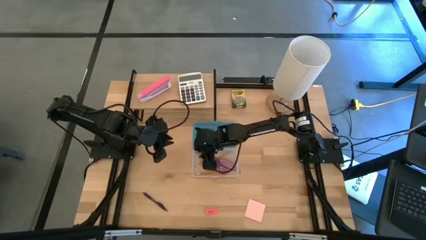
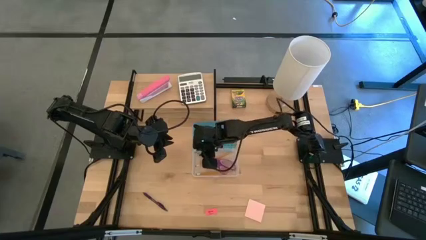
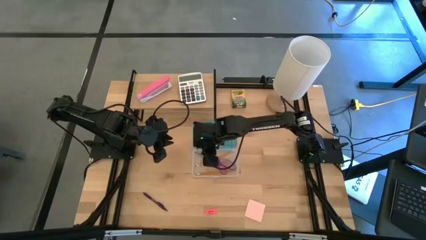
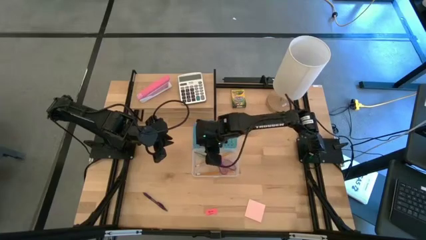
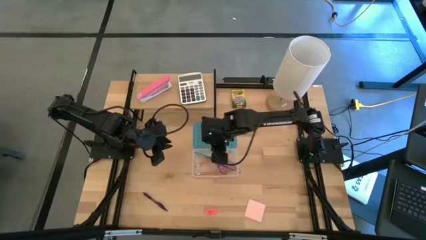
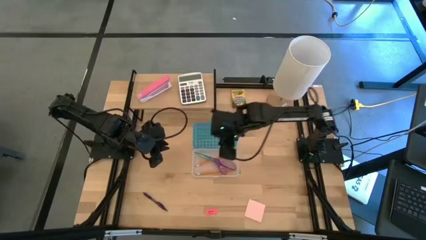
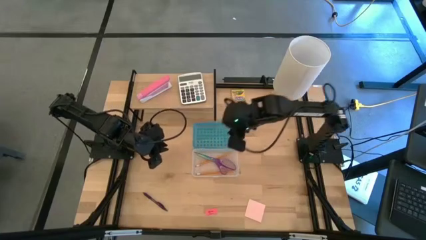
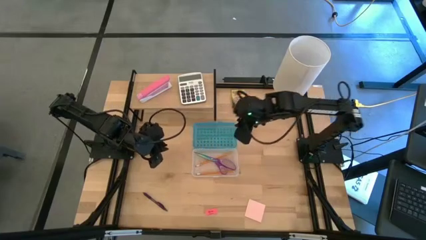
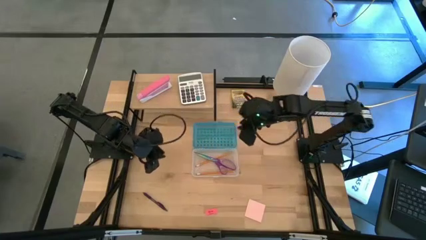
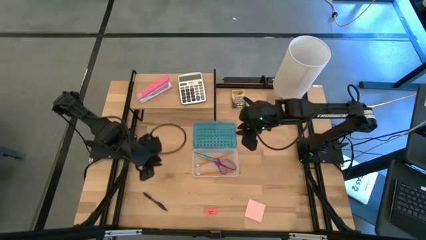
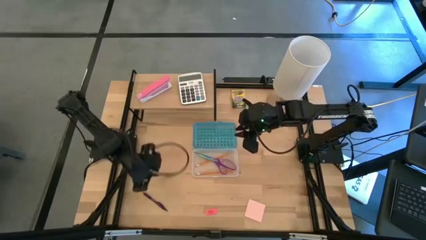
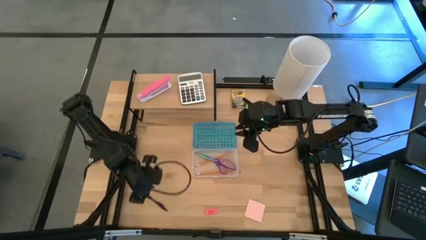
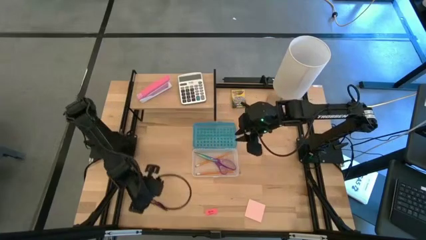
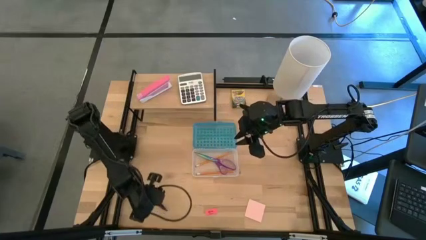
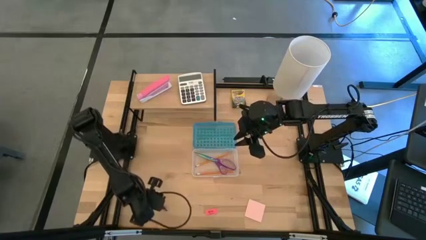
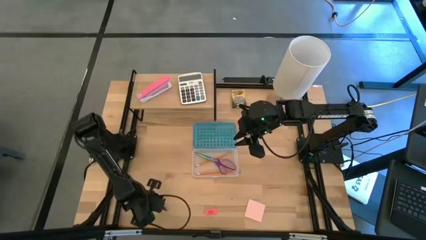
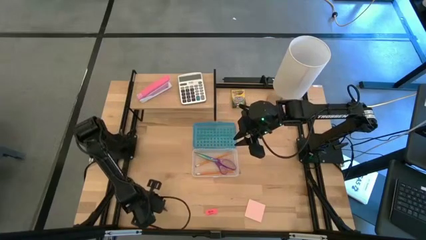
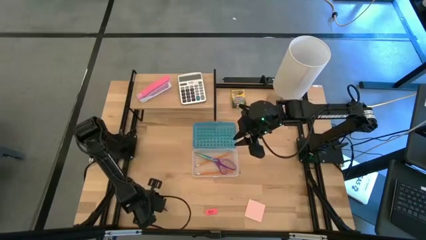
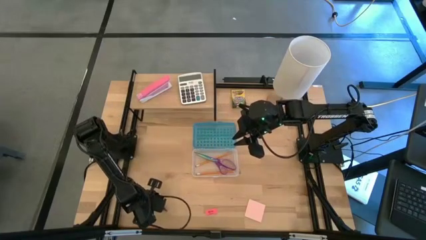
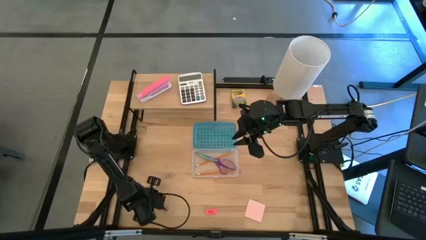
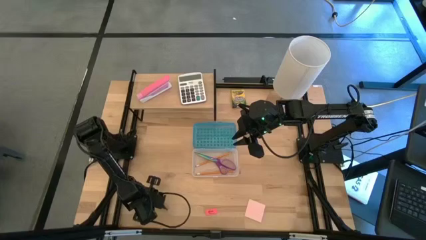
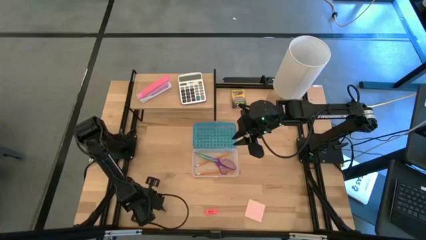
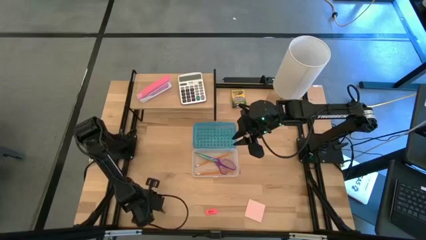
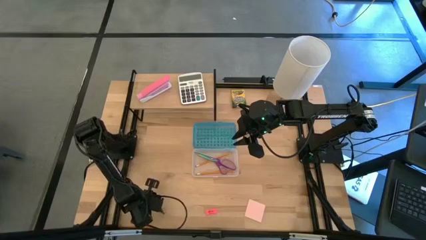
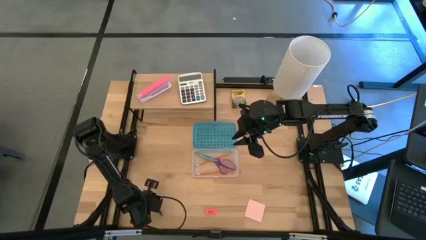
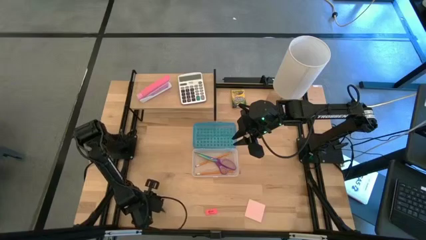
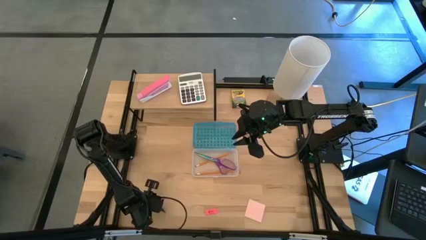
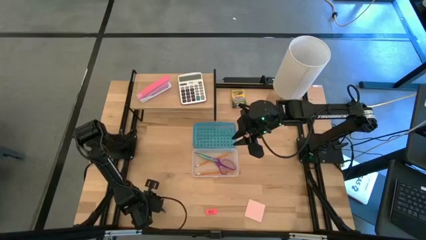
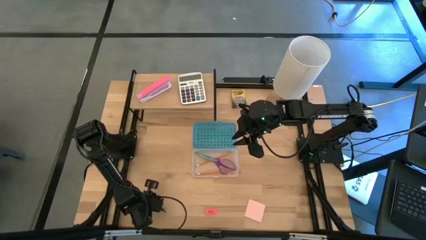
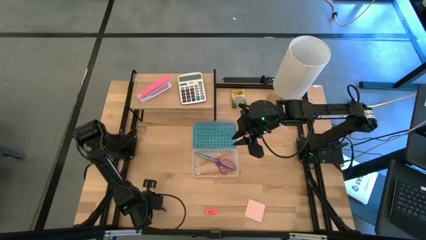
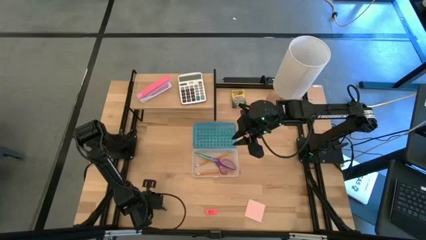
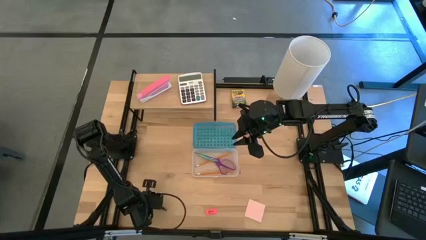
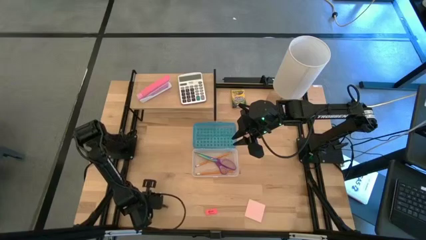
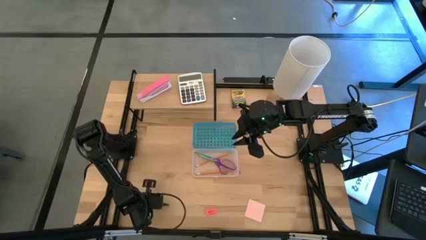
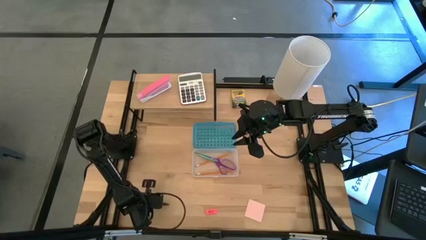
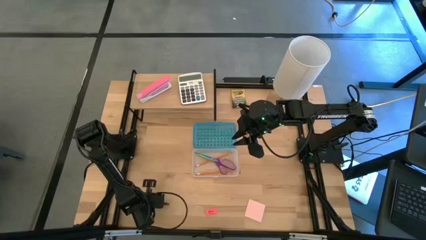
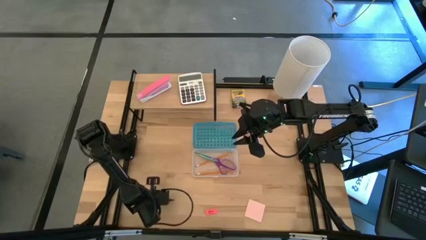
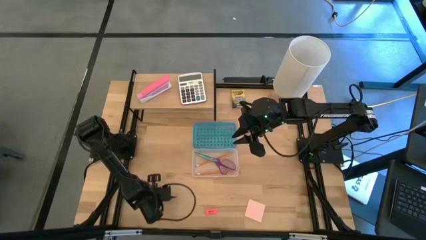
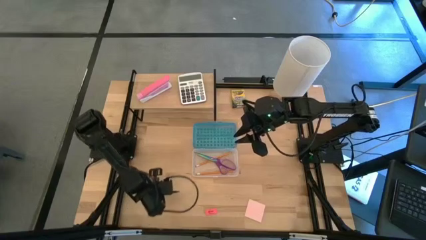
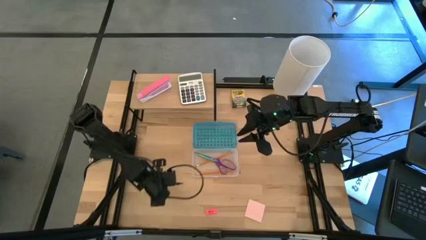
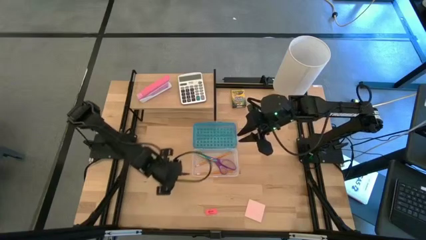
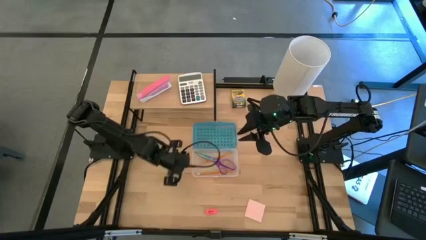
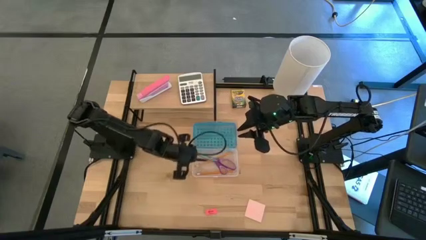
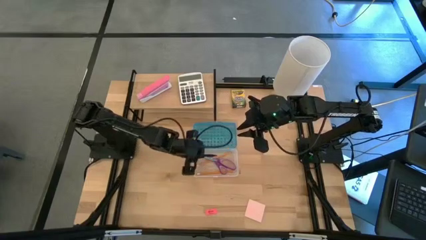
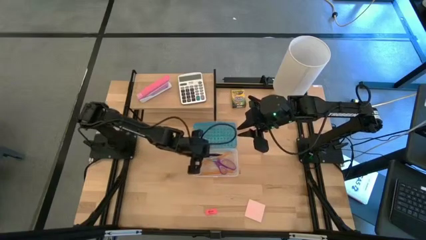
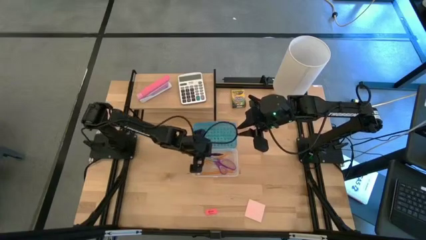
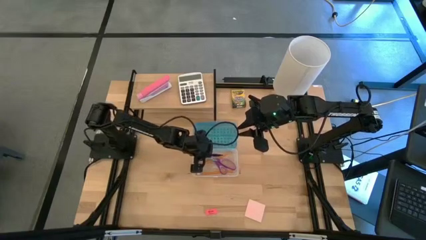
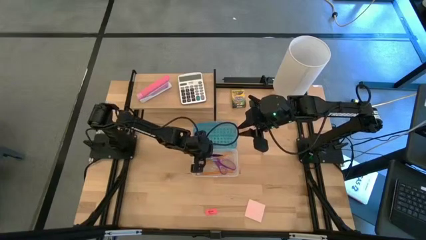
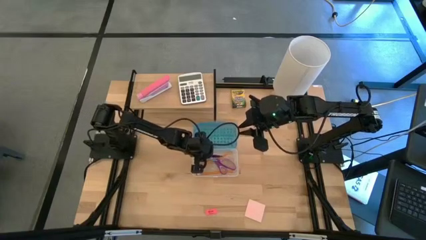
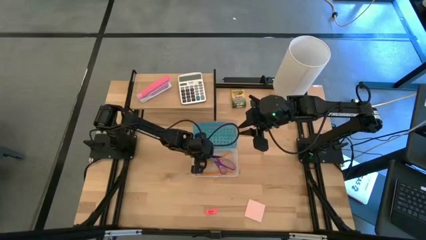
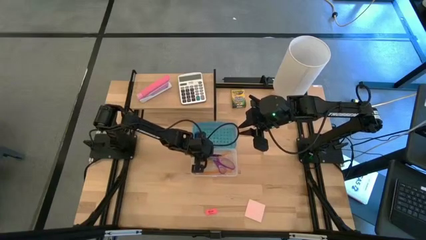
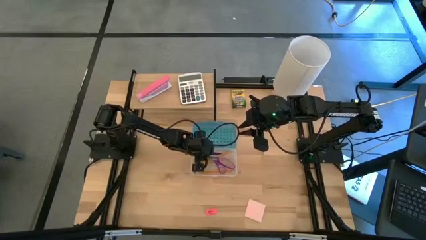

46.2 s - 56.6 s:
Task: Pack school essentials
Put the purple pen into the blue supply box

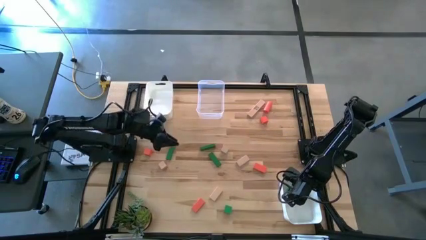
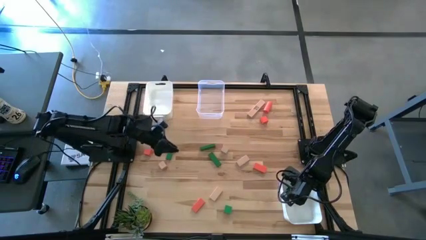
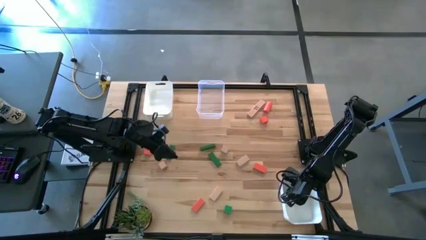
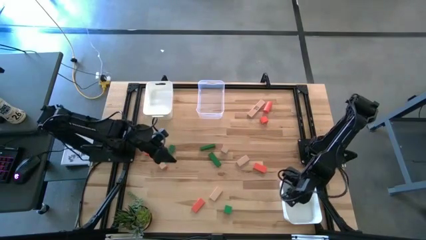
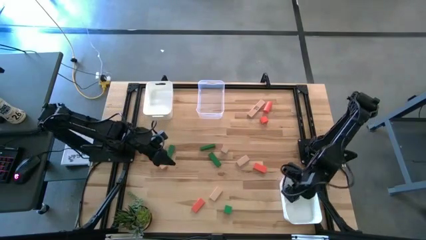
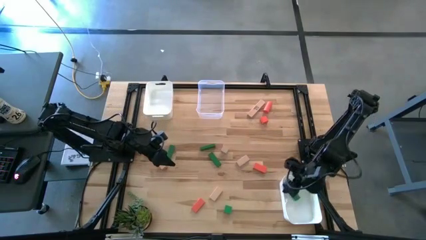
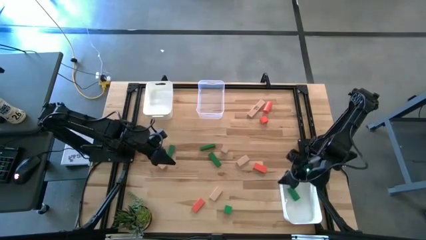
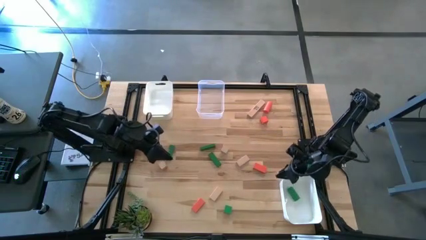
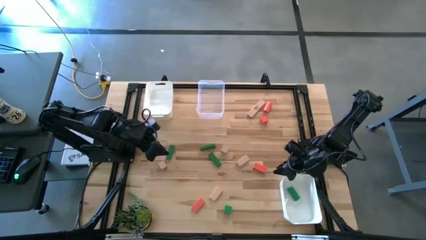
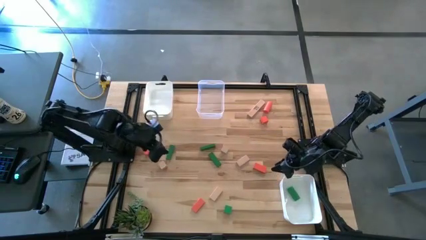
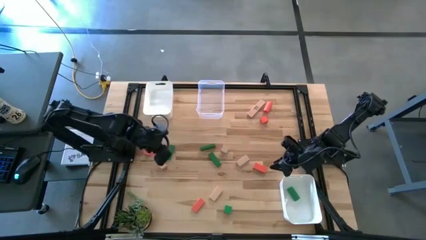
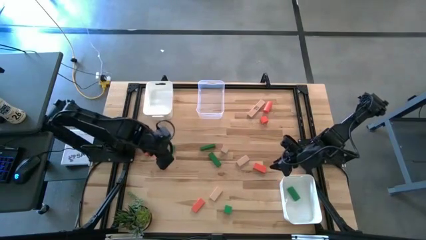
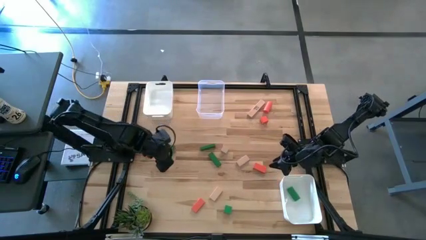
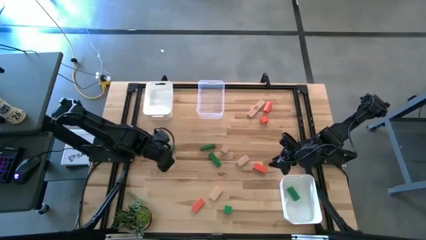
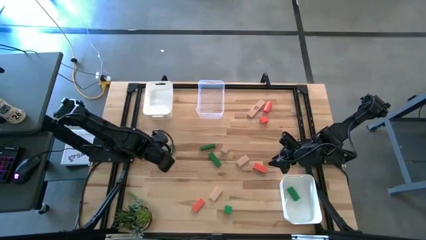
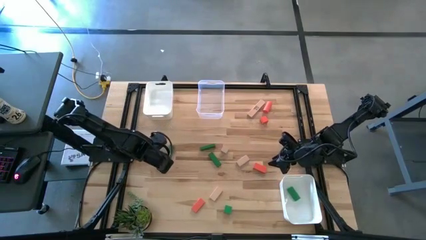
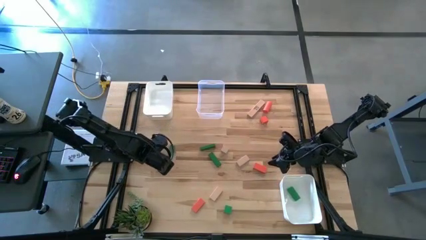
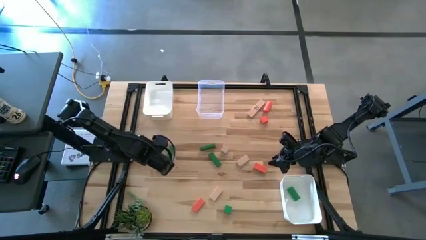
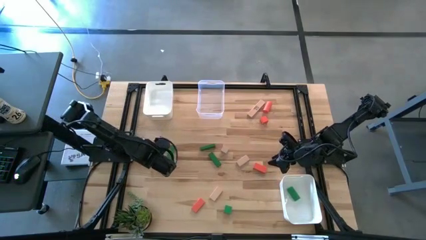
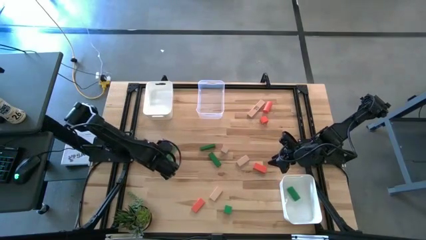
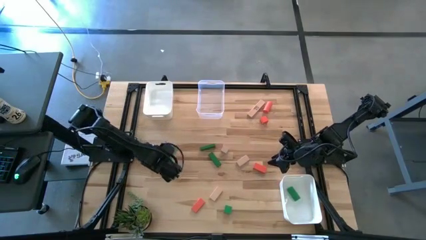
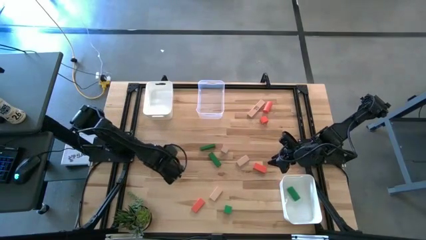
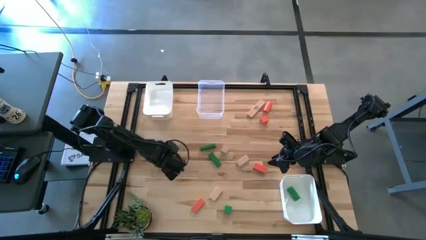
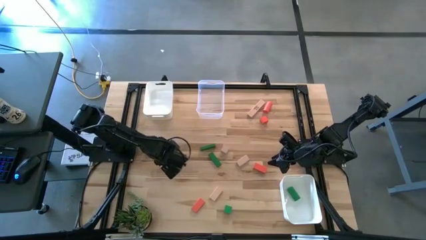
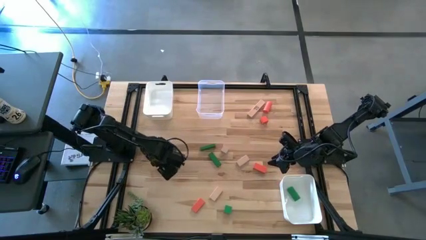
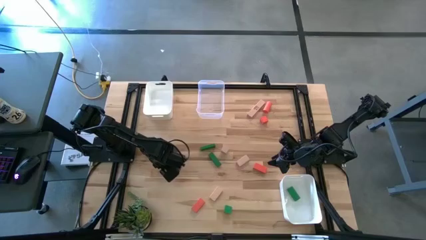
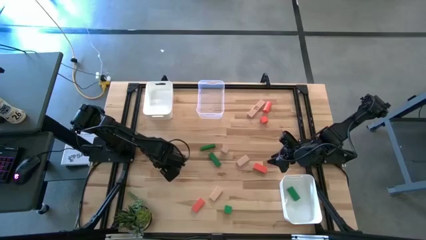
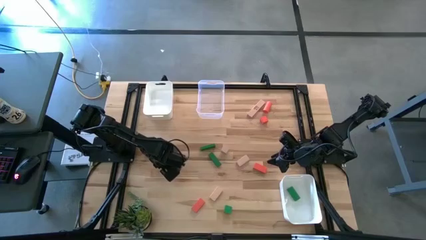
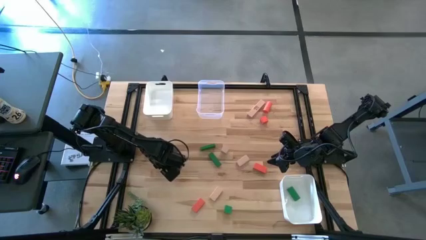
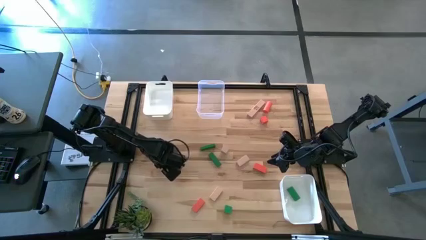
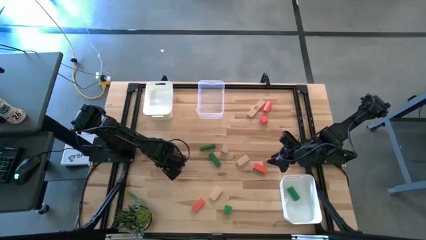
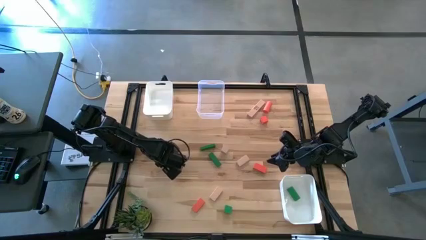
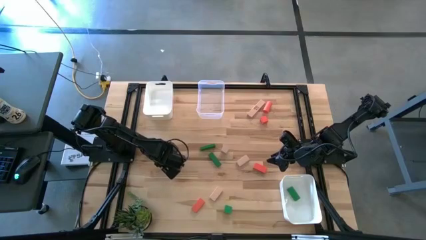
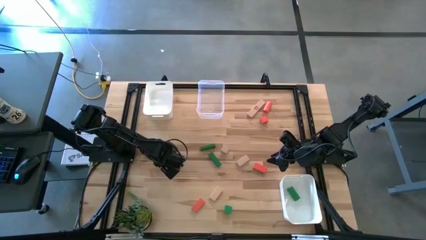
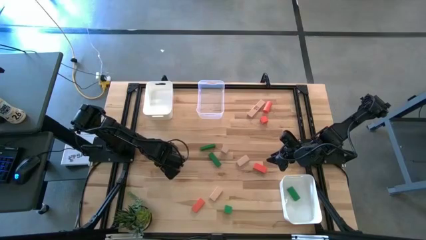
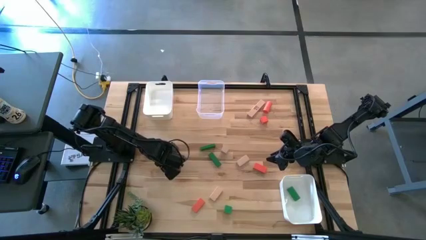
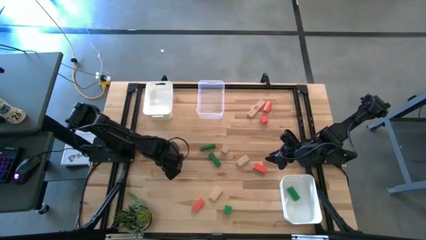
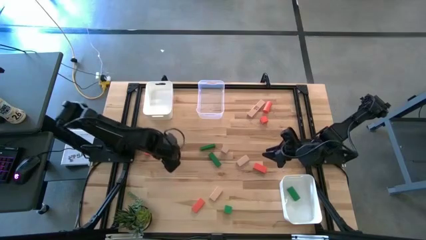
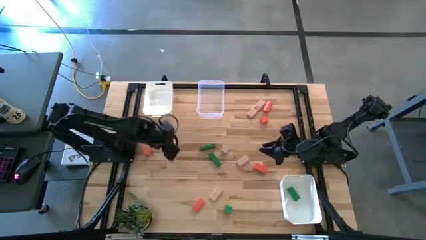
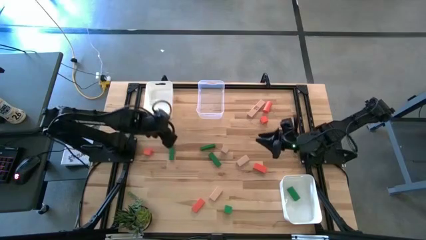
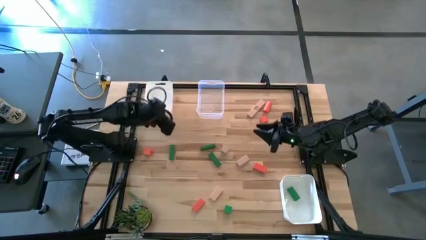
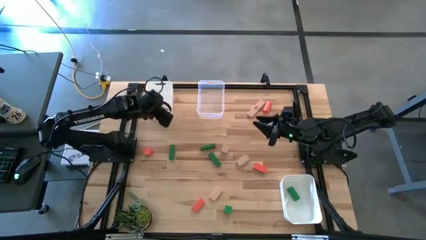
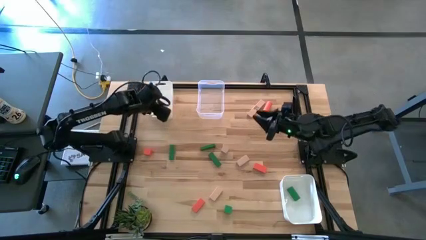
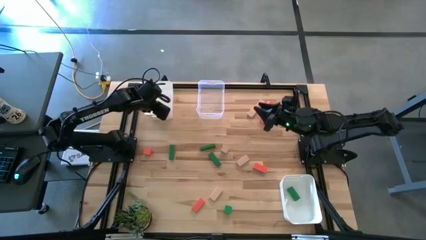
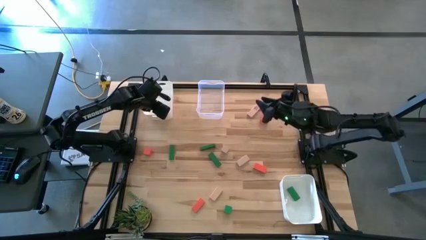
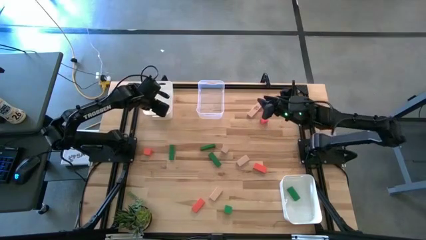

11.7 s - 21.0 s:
Task: Sort & place blocks by color
Put the brown block into the top white bin
